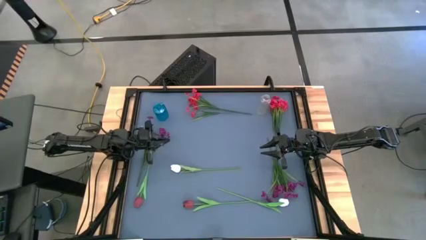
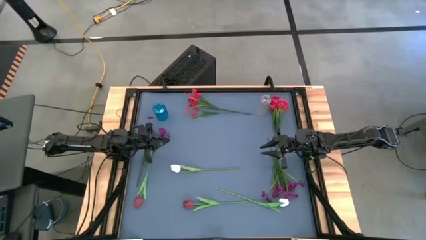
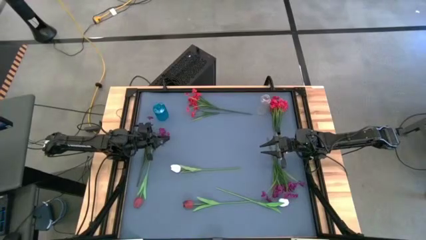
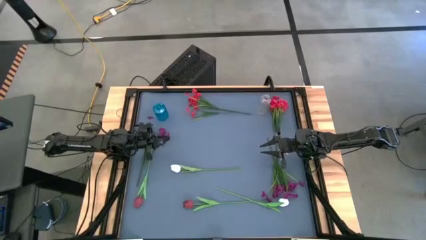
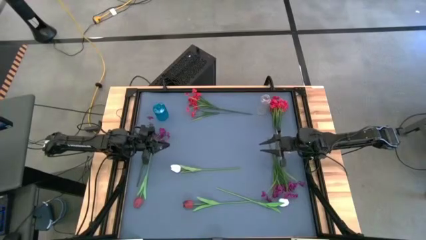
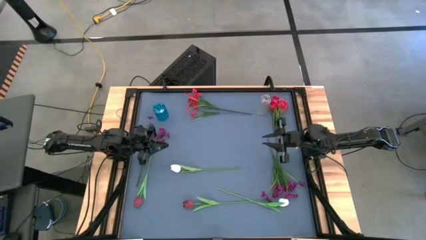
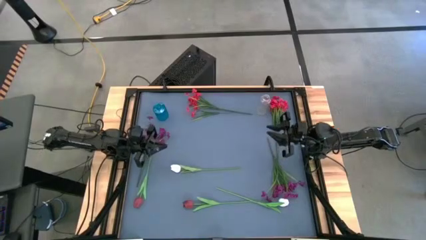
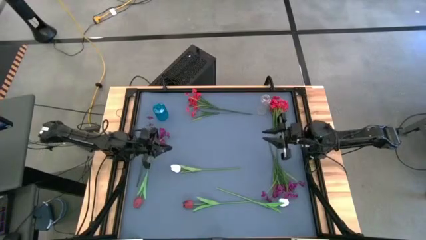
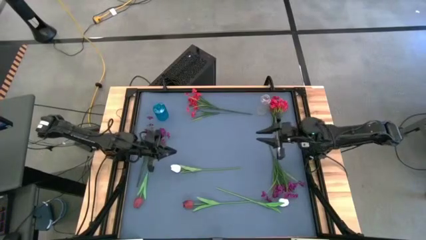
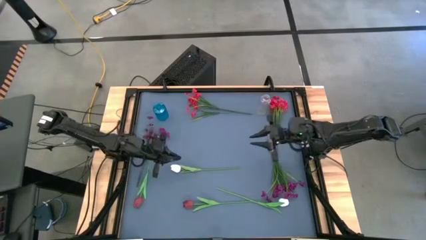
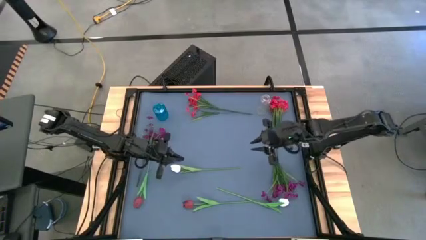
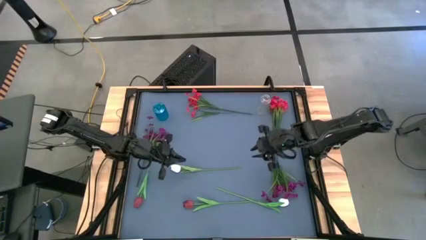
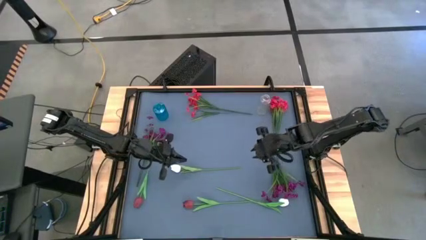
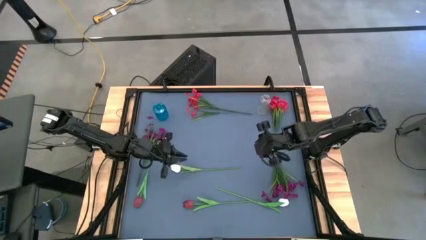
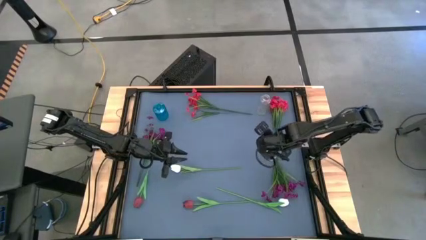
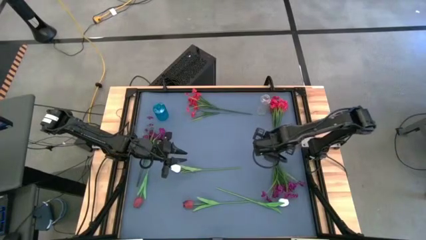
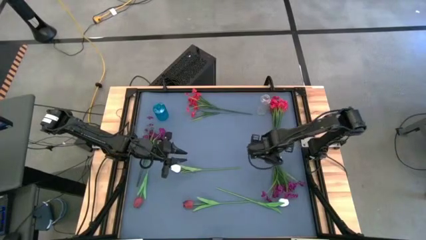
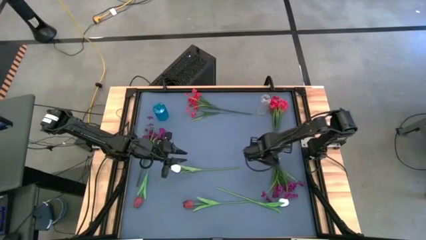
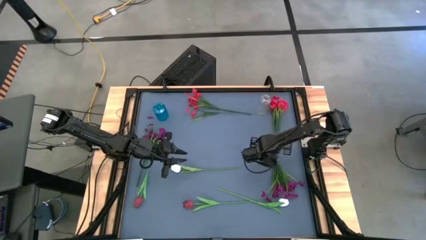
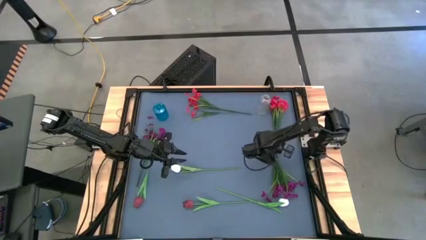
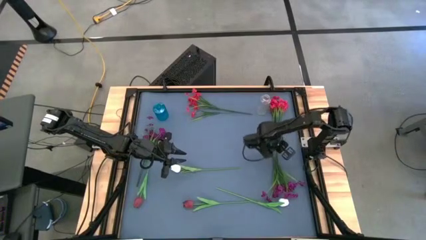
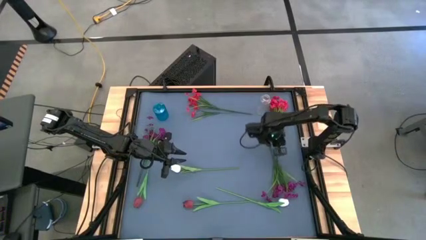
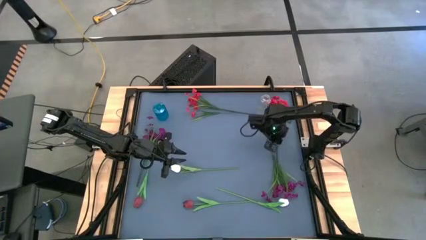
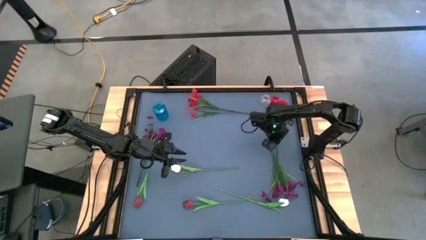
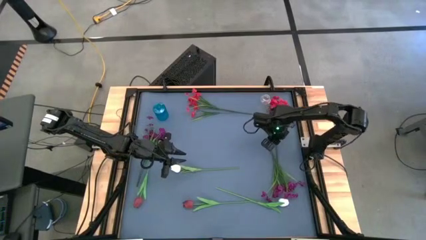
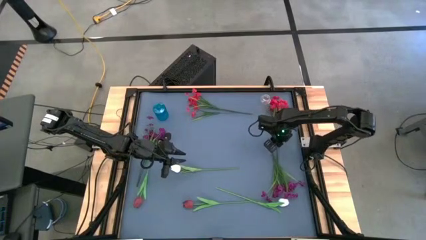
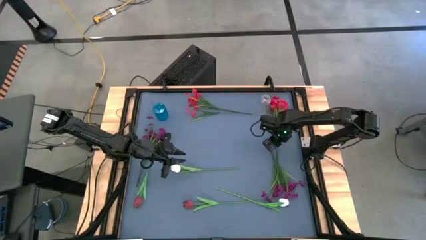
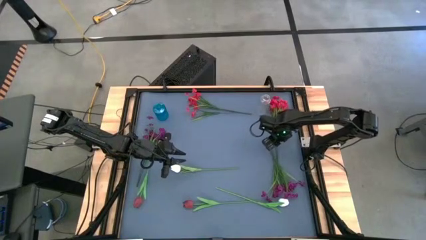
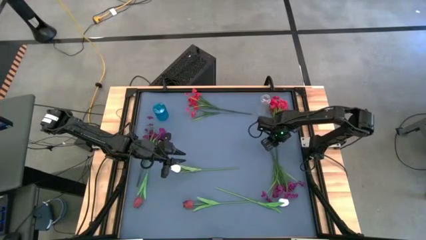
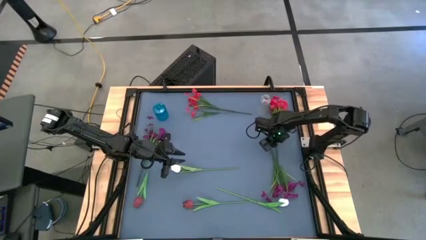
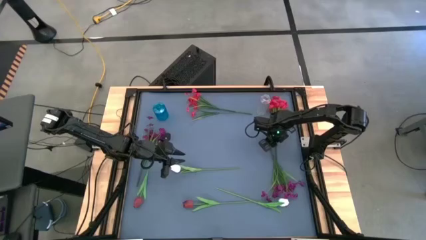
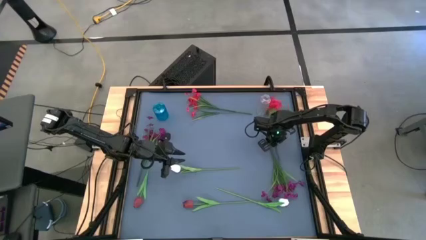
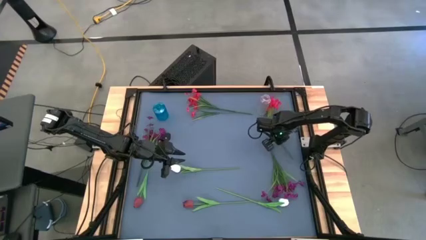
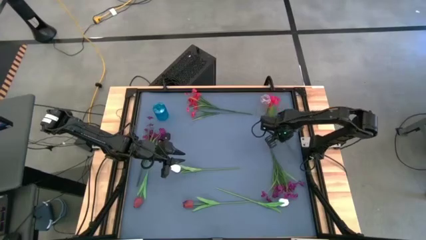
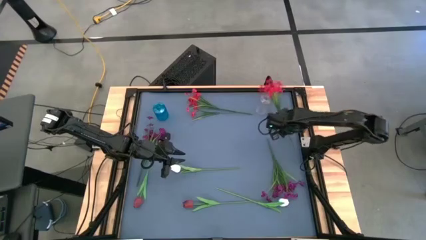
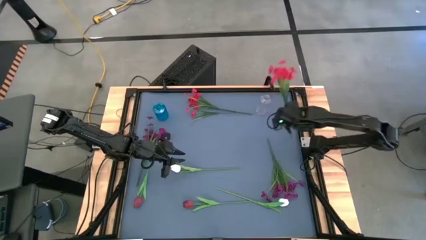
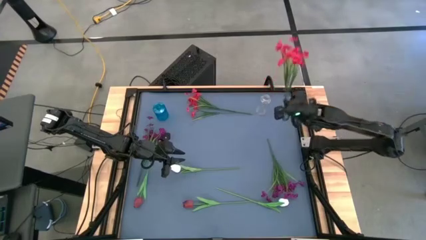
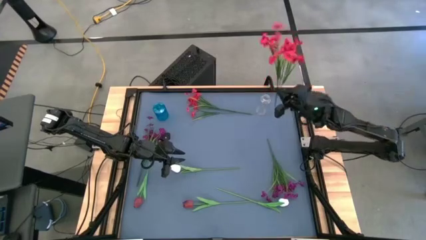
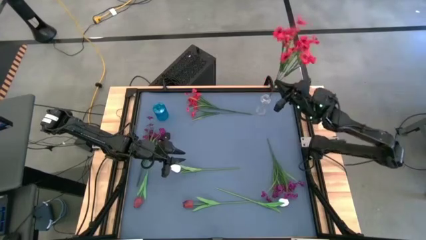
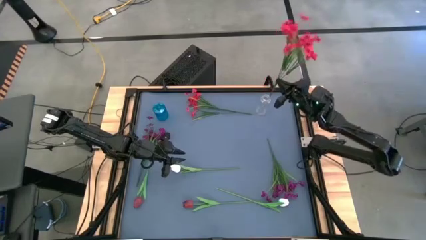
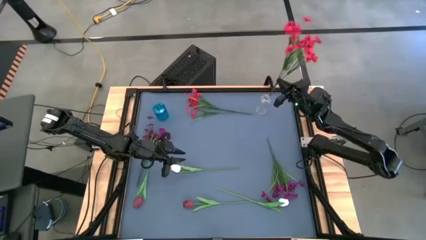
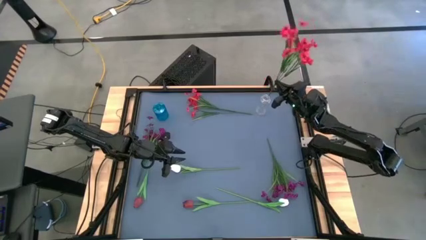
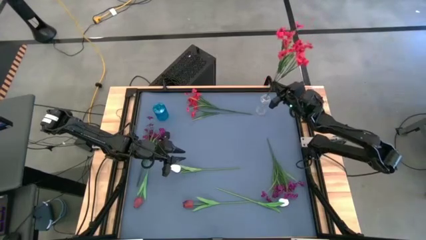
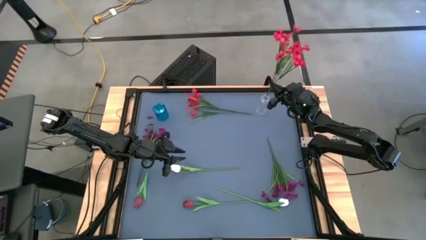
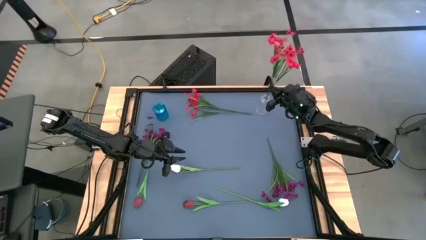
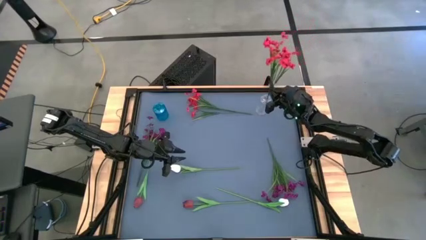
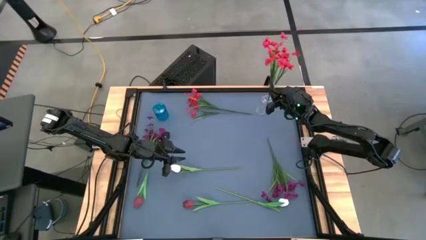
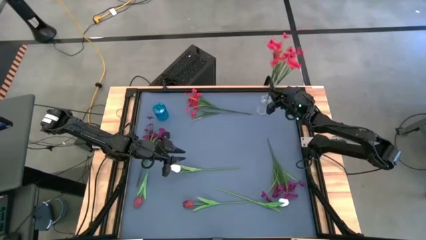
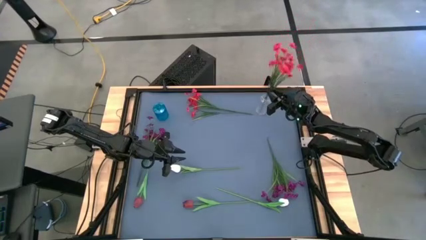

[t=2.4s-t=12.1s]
Task: Sort flowers into vase by color
Put the right red flowers into the transparent vase

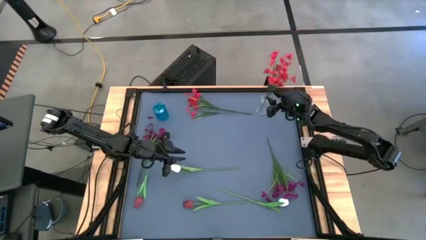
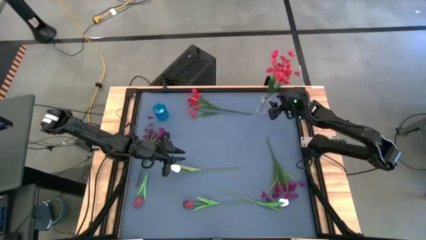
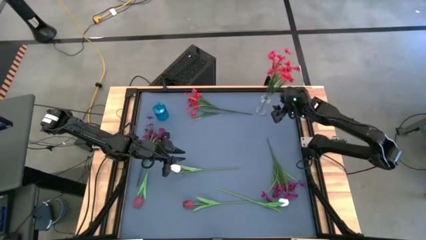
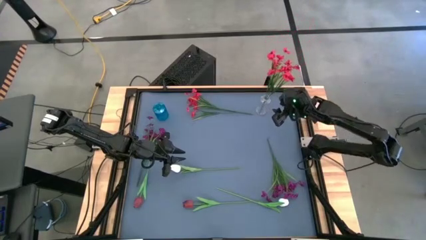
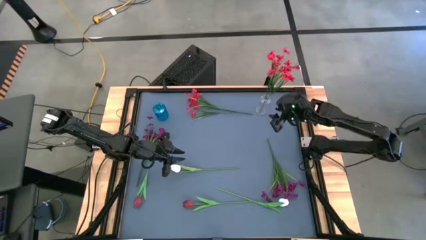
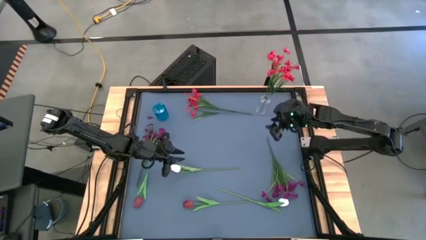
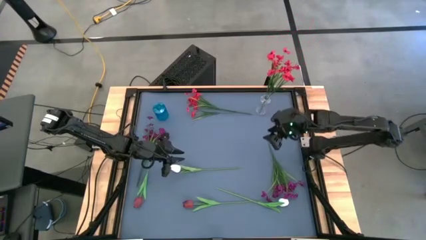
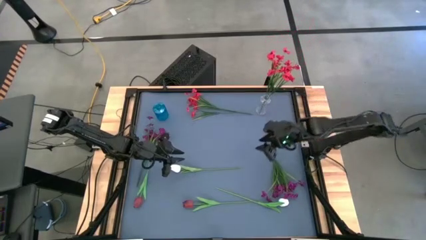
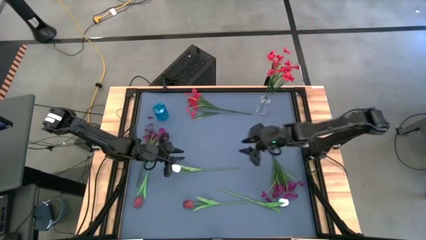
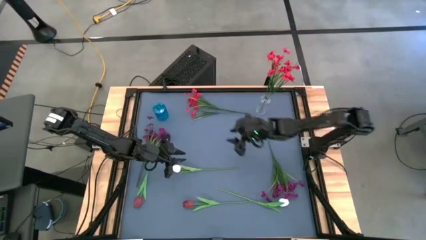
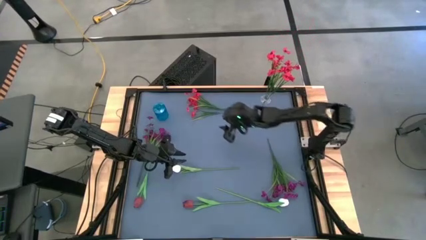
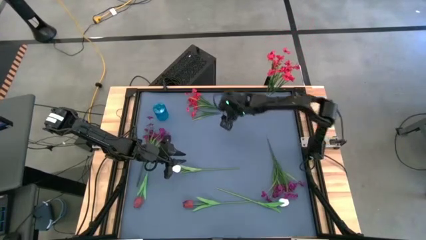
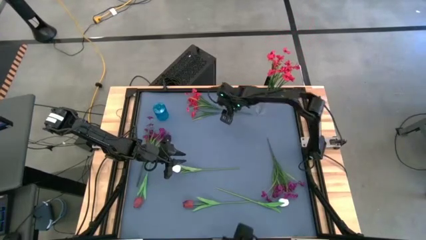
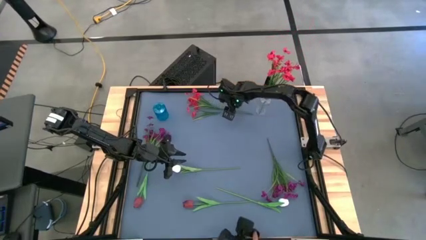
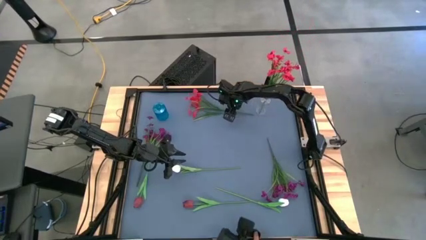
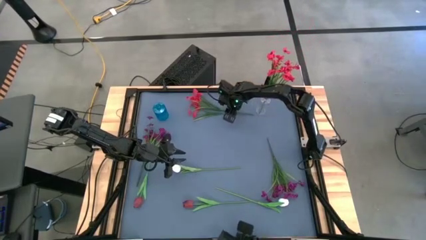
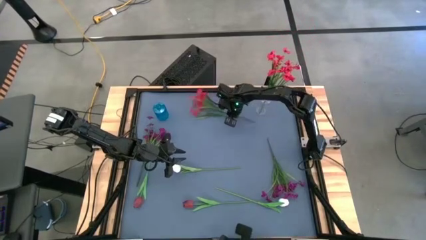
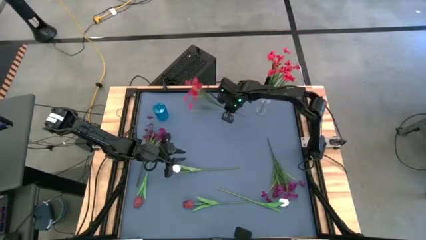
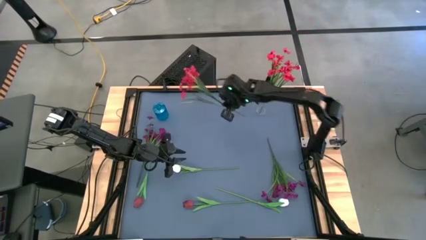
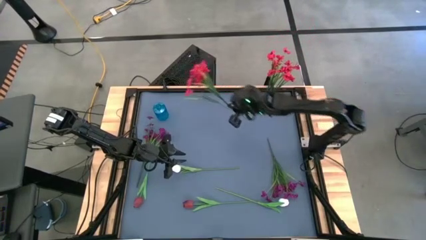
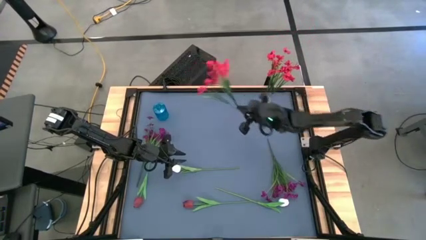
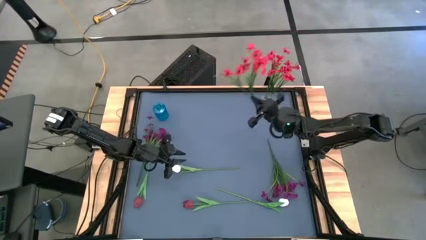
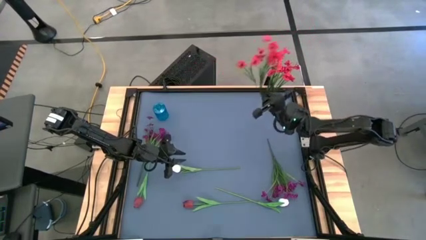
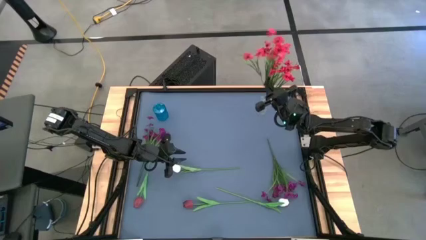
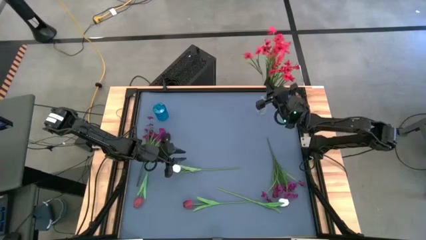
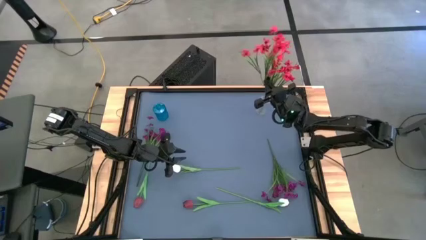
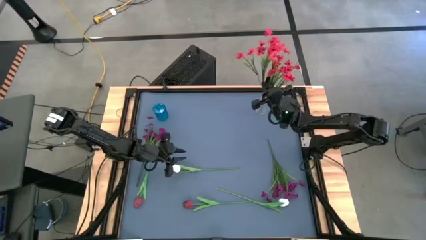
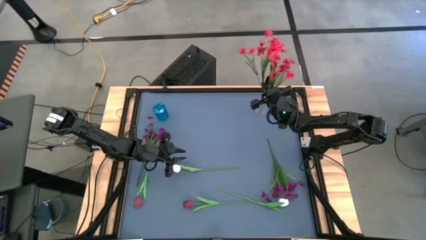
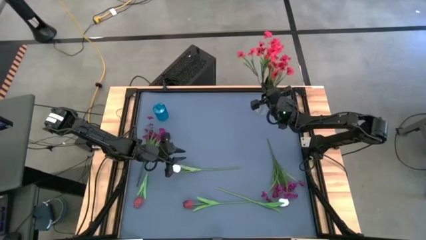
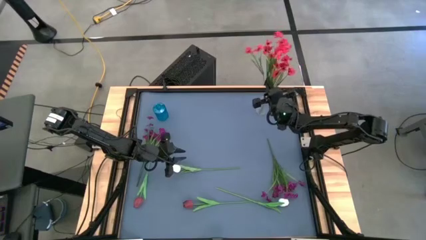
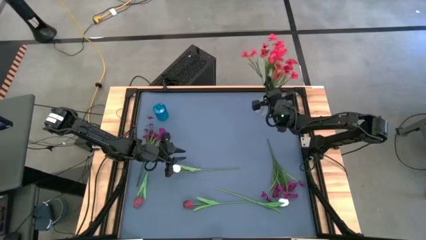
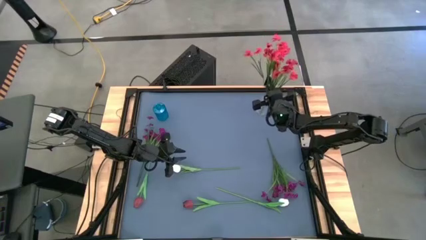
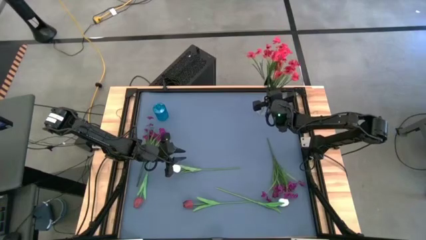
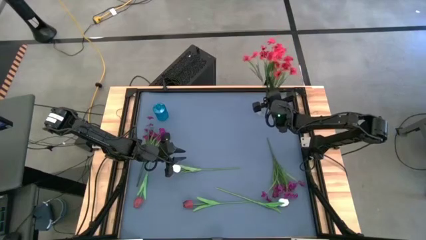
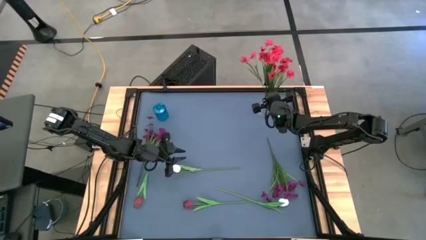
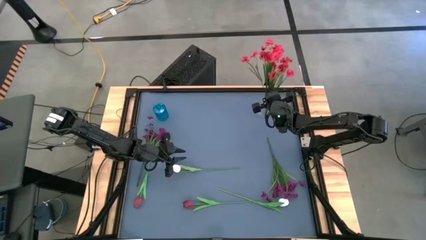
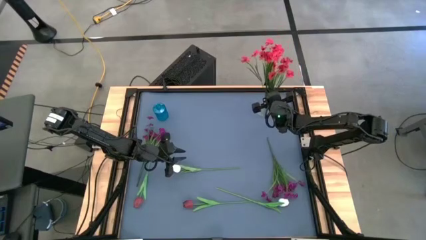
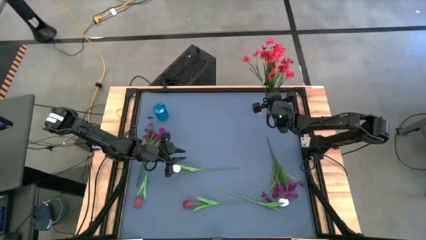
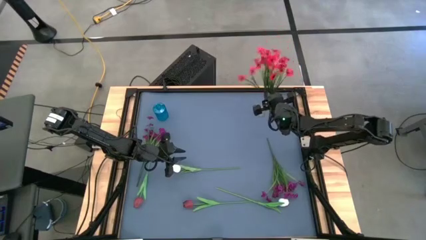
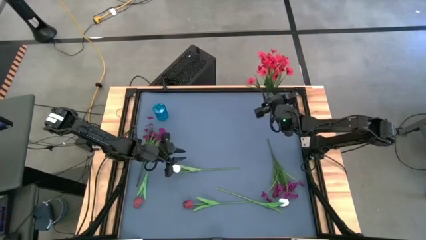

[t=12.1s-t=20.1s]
Put the red flowers into the transparent vase

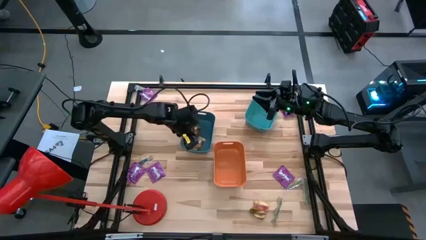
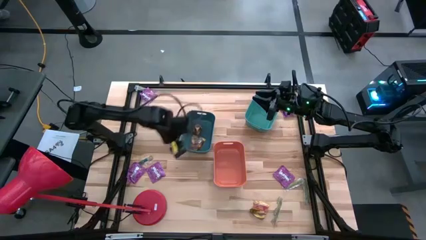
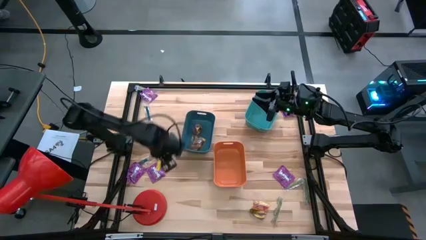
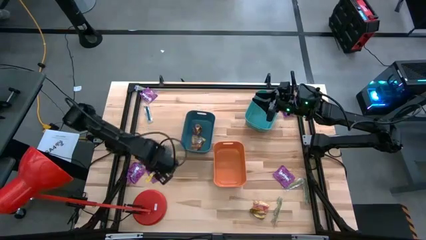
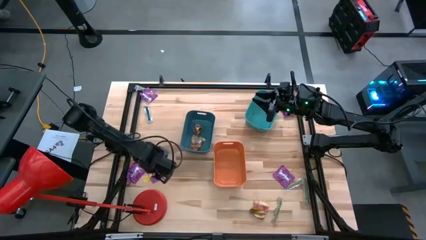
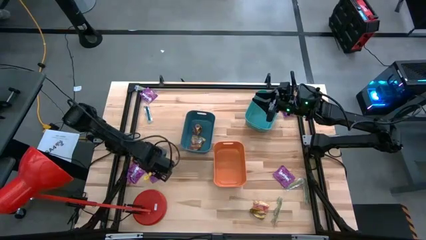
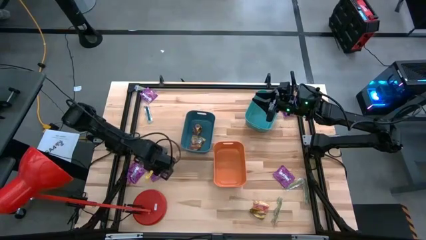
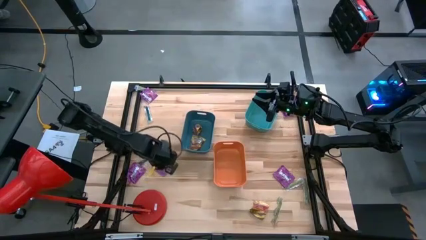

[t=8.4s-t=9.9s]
Task: Sort candy
Put the violet candy into the orange bin
